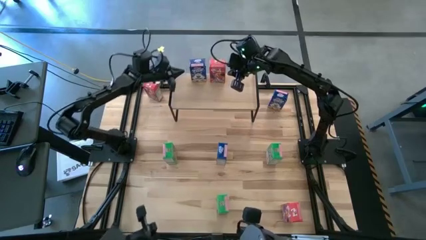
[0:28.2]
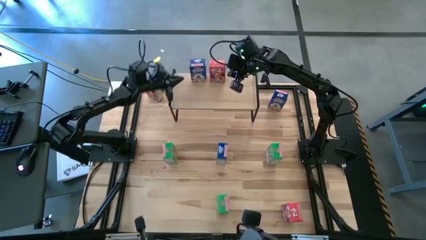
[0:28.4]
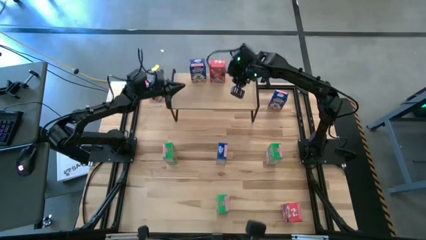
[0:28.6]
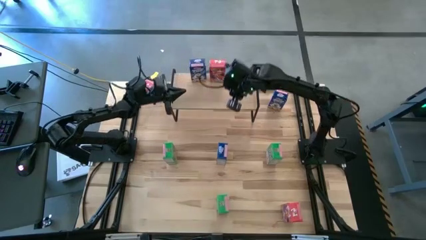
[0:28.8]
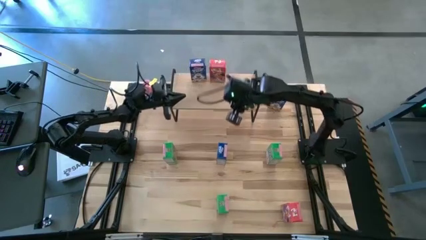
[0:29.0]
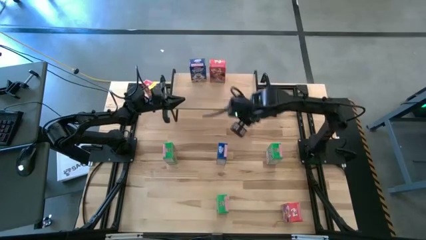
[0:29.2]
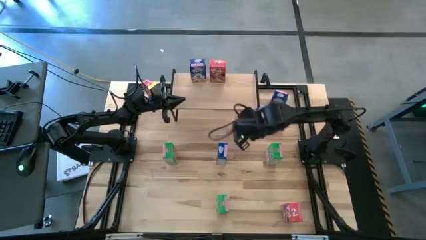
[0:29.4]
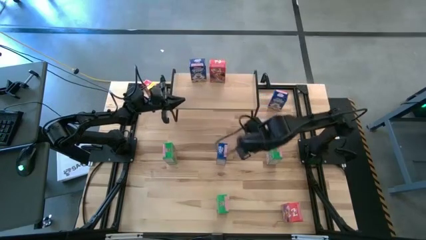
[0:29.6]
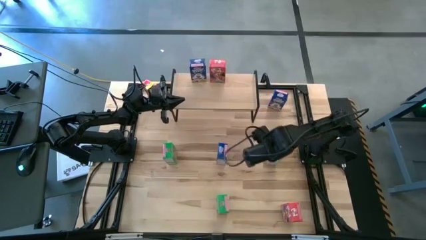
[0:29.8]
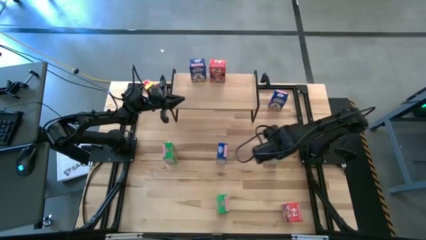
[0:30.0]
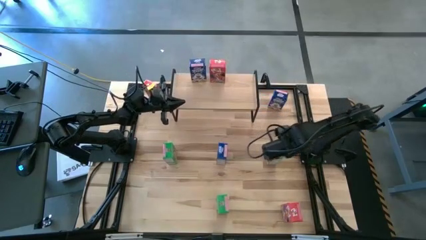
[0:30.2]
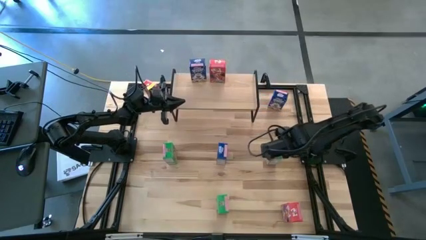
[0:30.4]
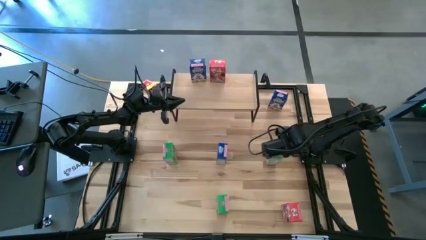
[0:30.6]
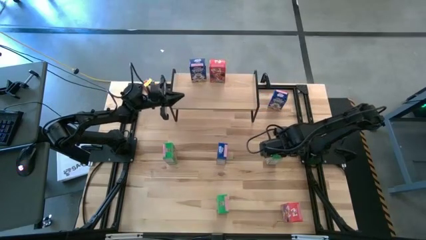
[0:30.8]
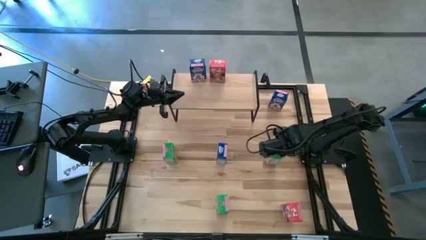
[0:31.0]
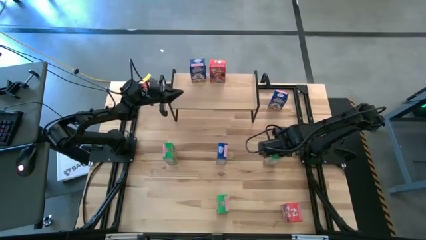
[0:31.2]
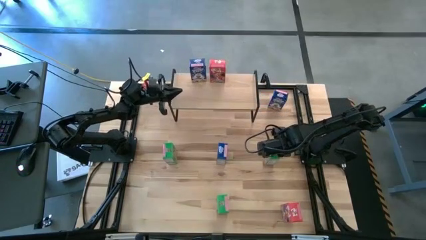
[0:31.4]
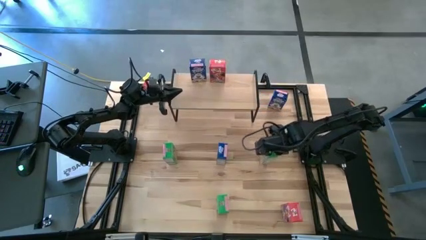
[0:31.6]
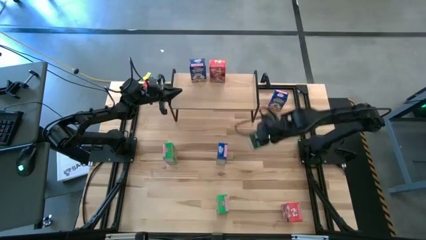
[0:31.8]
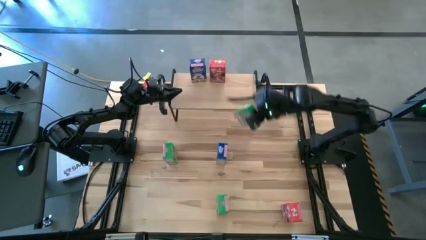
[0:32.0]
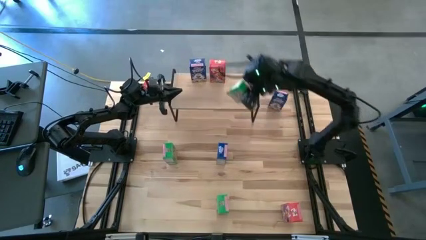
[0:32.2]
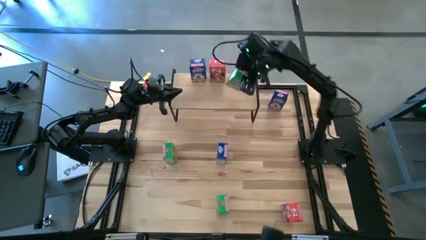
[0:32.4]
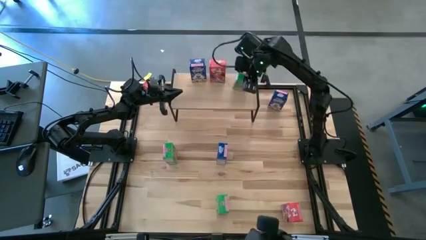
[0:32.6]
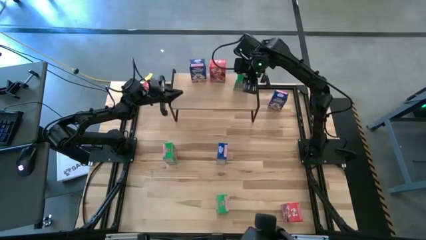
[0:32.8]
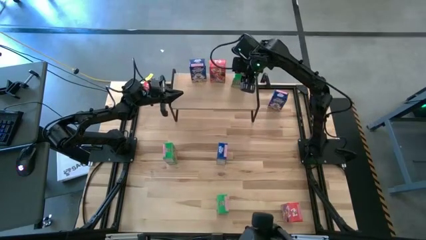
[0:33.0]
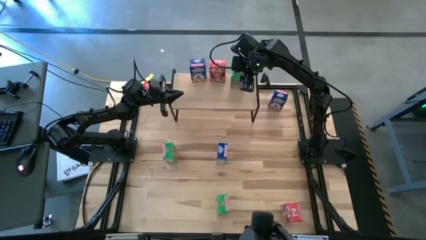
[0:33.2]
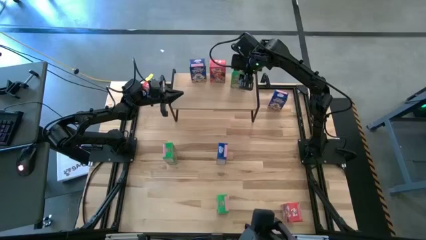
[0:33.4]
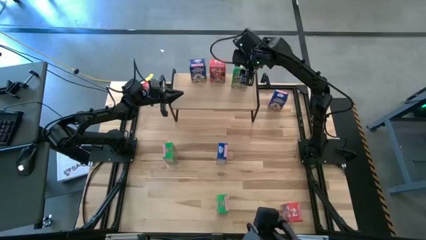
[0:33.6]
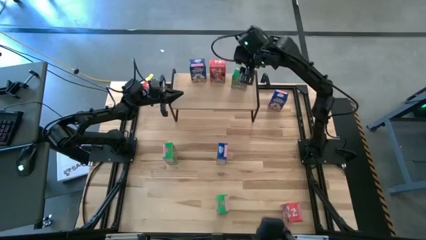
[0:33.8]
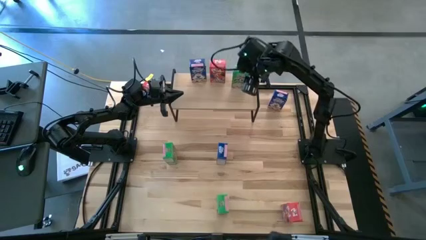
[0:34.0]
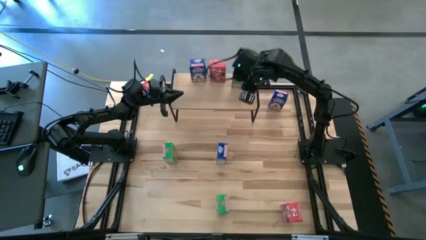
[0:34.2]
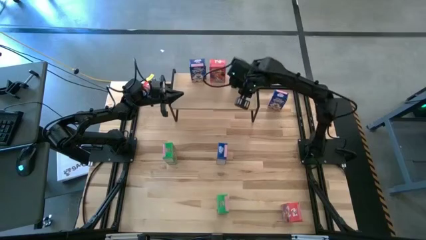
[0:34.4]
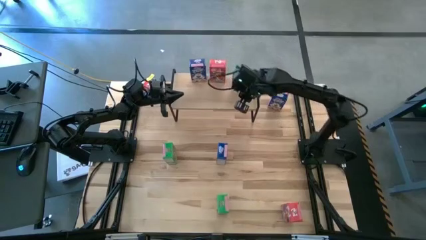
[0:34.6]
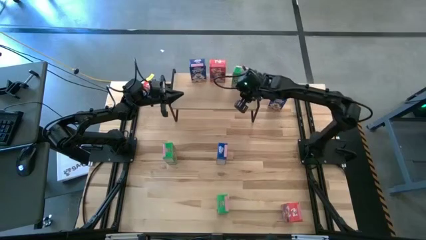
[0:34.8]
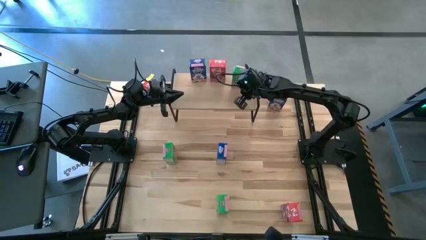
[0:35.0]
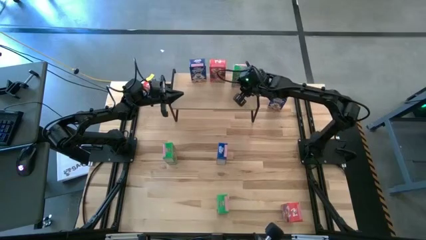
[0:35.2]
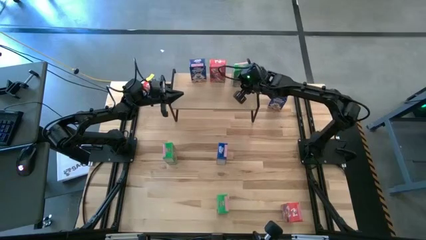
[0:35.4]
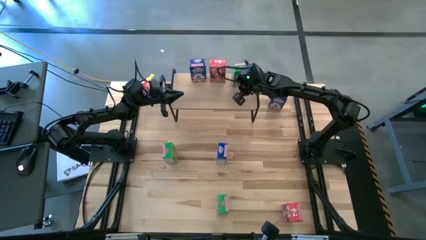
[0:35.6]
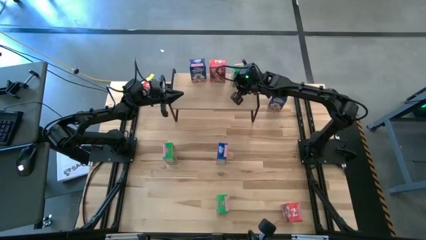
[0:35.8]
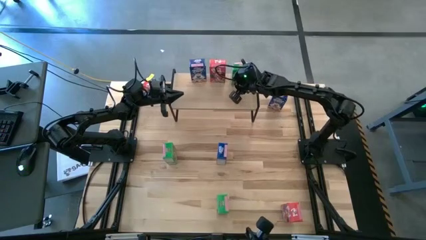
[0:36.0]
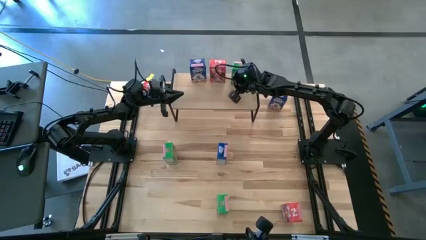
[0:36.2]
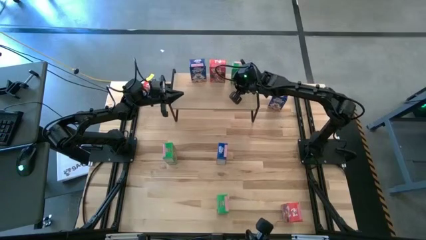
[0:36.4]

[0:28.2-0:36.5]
Task: Stack cereal on shelf
Put the top right green cereal box on the shelf
